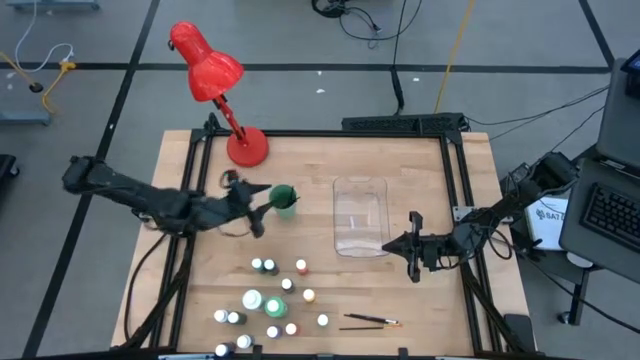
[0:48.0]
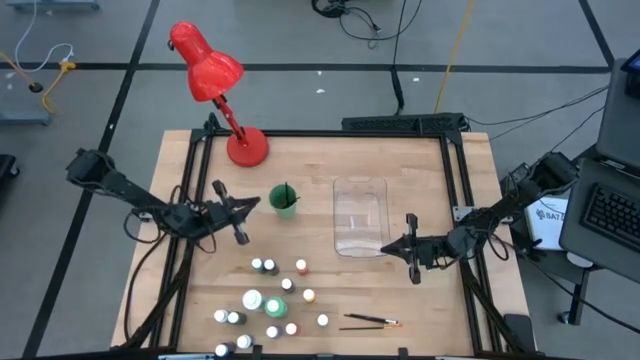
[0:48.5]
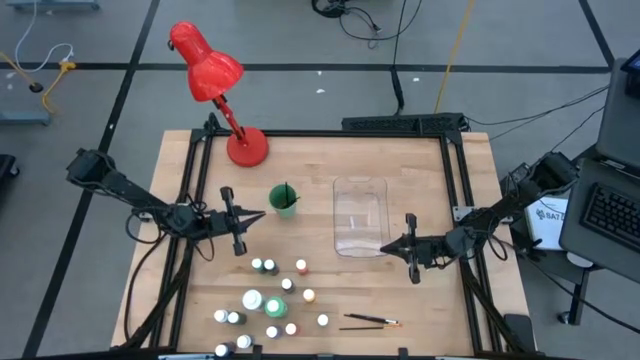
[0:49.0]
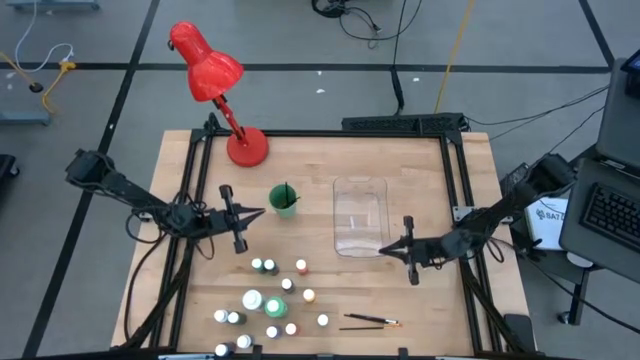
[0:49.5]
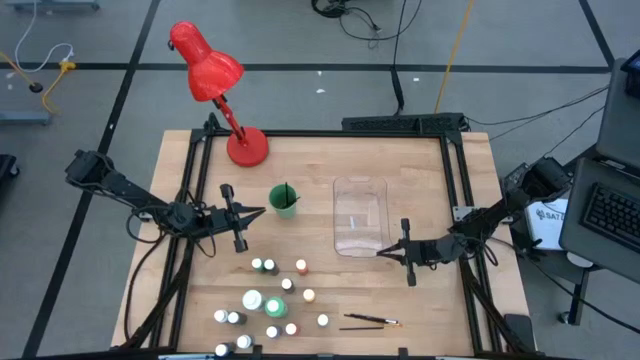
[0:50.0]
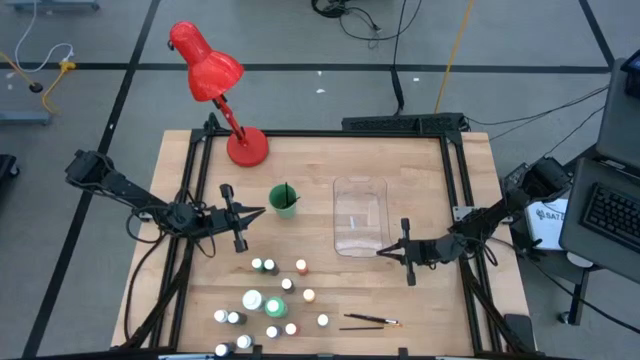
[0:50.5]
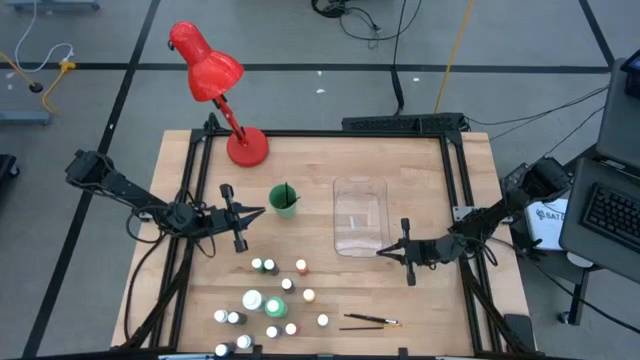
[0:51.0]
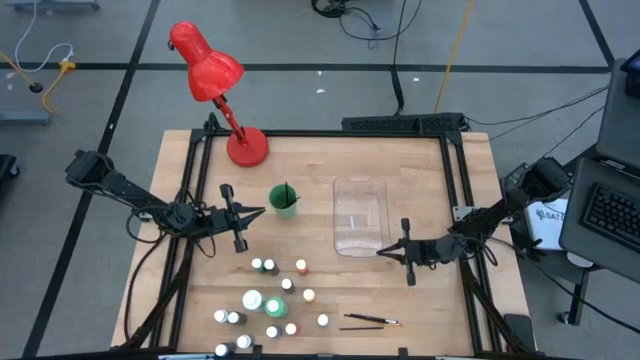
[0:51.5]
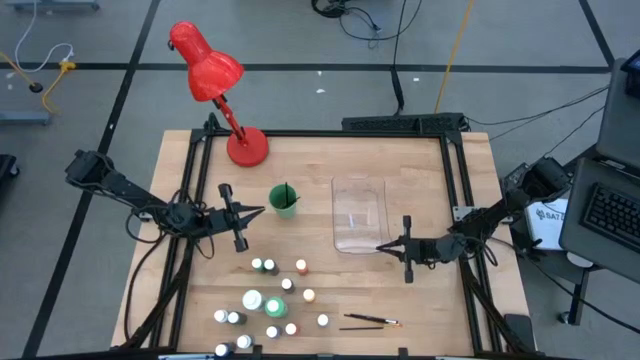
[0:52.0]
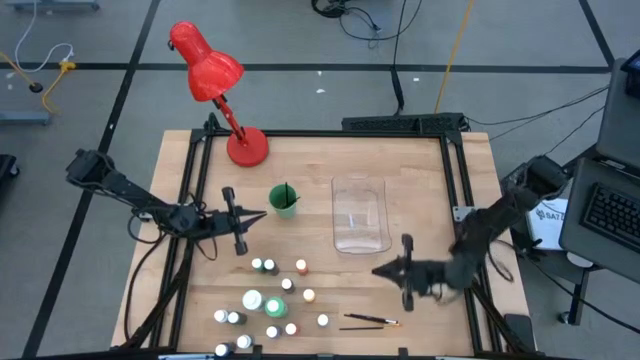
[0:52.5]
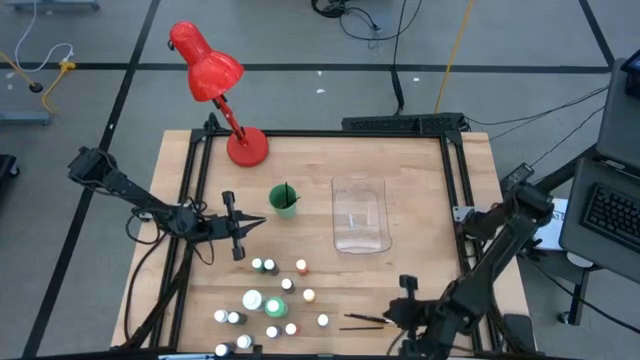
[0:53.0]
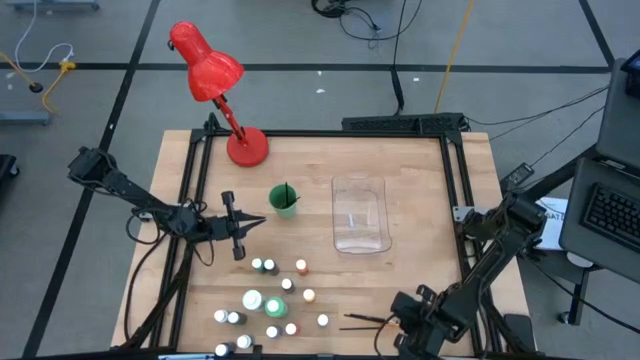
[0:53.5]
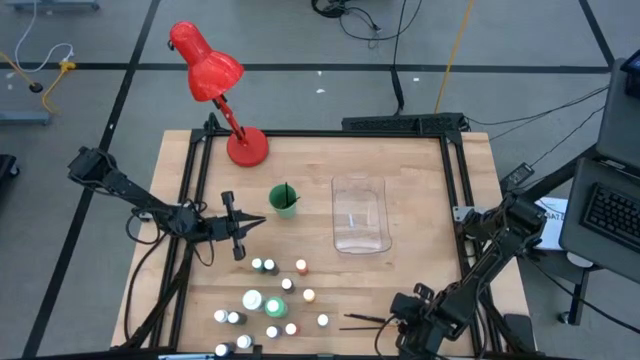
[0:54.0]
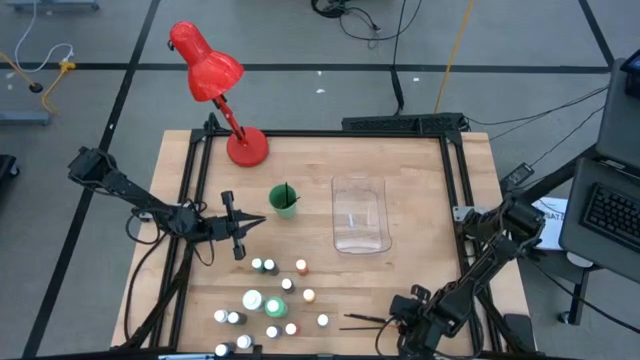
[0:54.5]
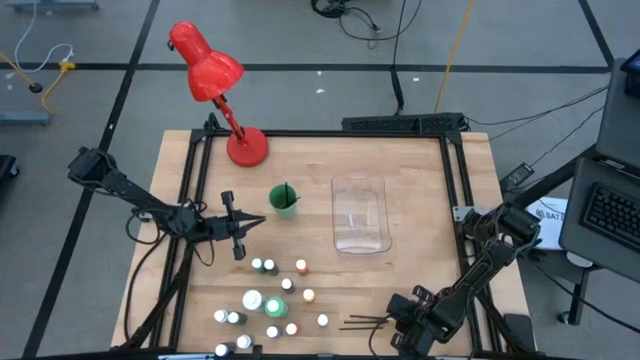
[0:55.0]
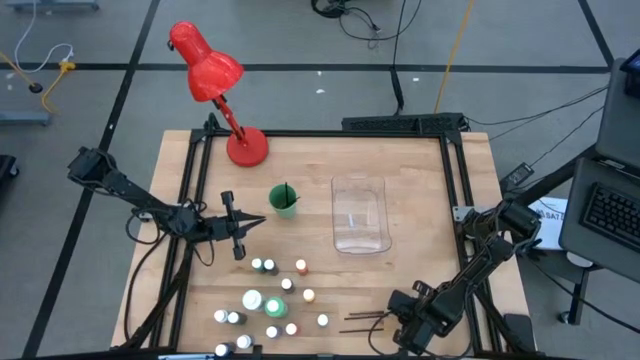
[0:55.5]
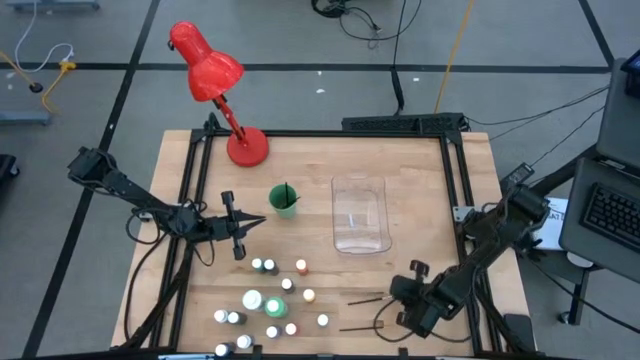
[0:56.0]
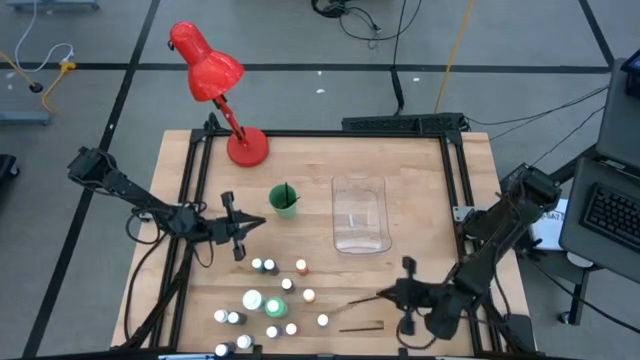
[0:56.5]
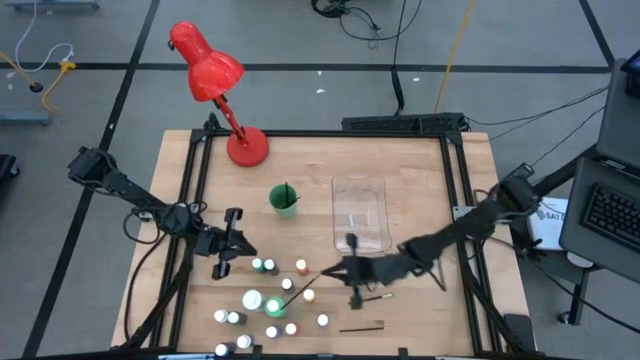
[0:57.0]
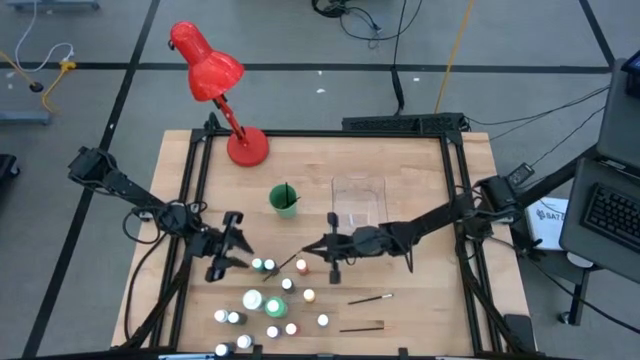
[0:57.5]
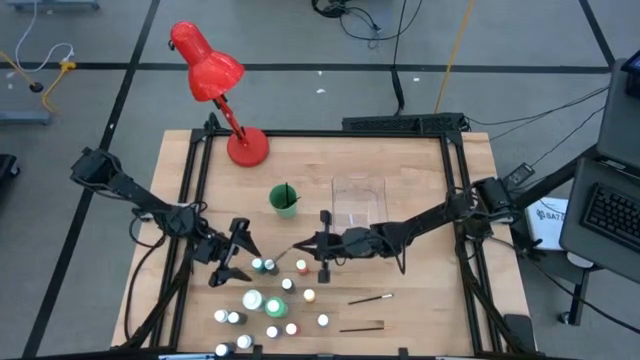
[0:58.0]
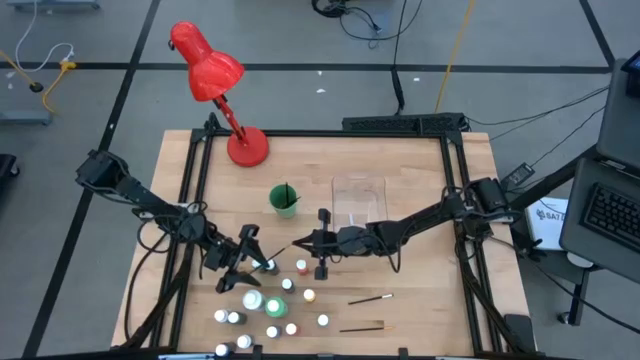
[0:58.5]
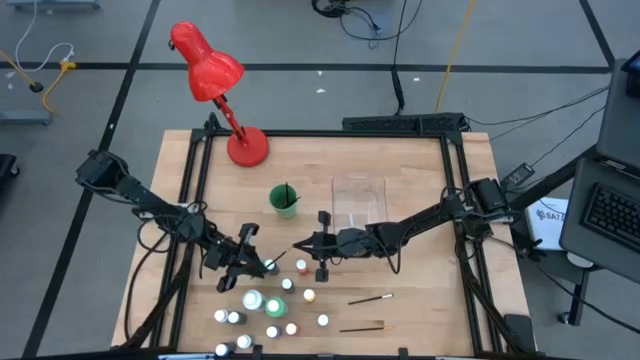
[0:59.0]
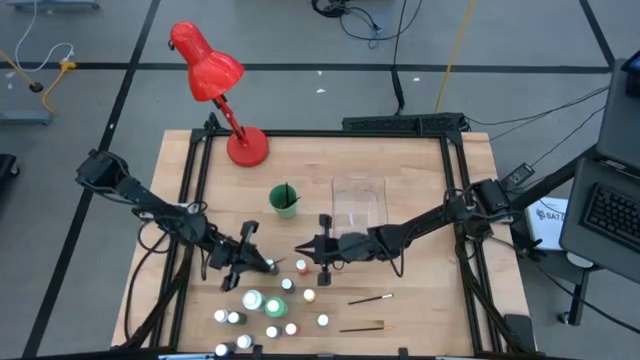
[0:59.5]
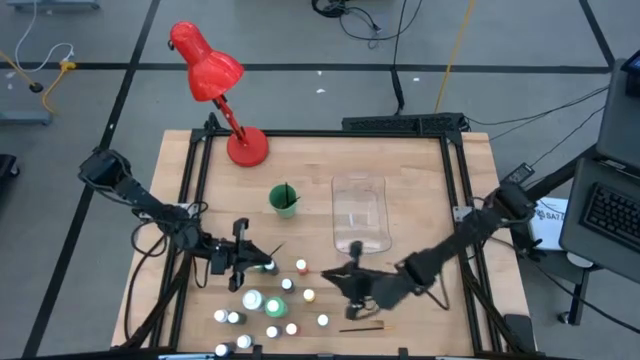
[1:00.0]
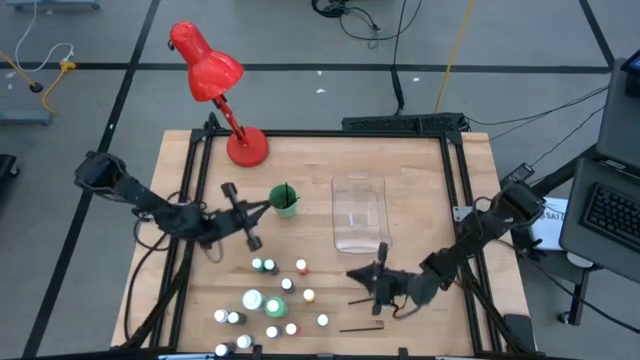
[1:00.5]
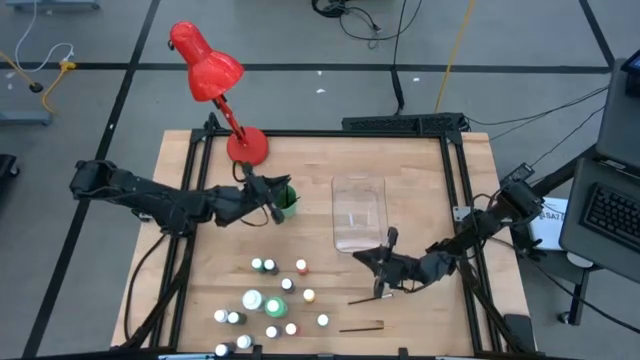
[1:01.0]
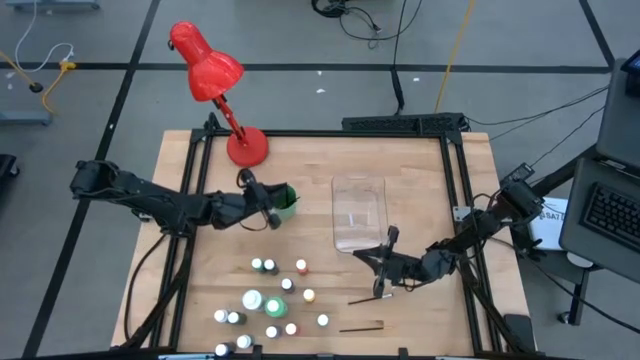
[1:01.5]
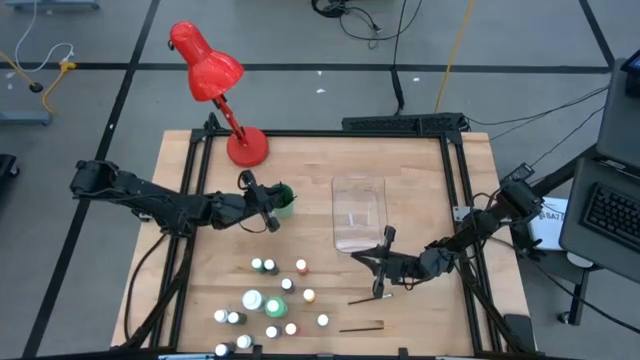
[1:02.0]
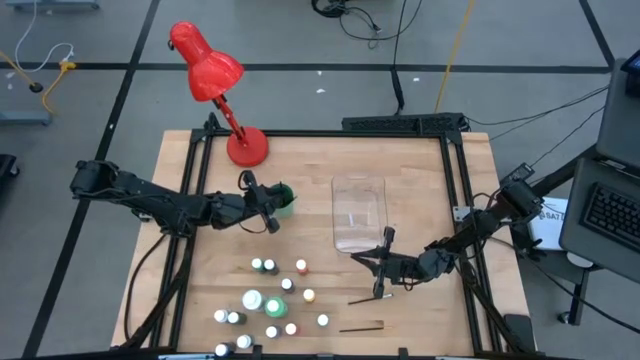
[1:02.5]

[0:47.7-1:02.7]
Task: Pick & Place Paint Supplies
Put the gold paintbrush into the green cup

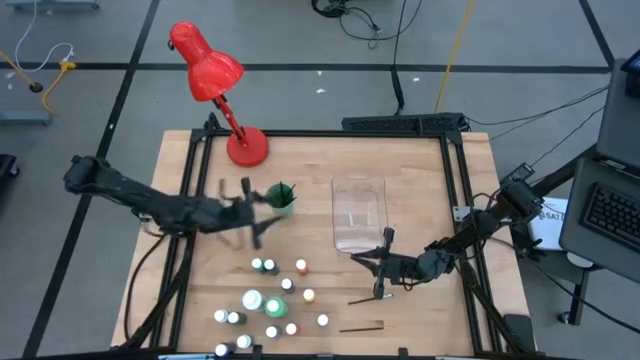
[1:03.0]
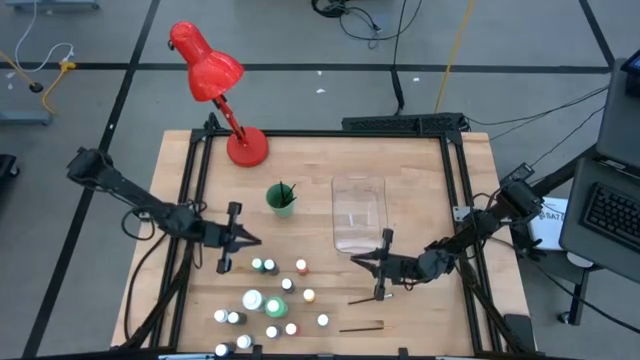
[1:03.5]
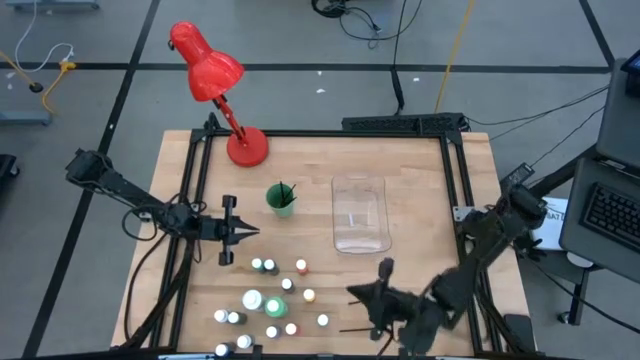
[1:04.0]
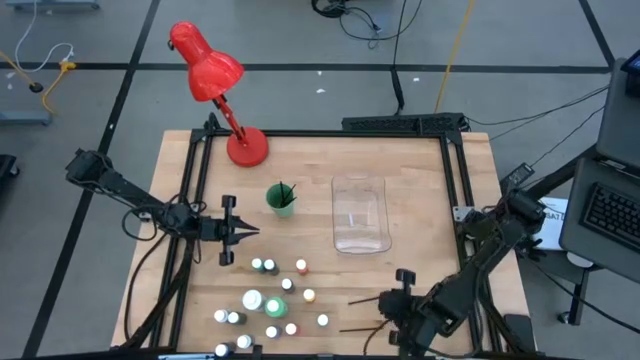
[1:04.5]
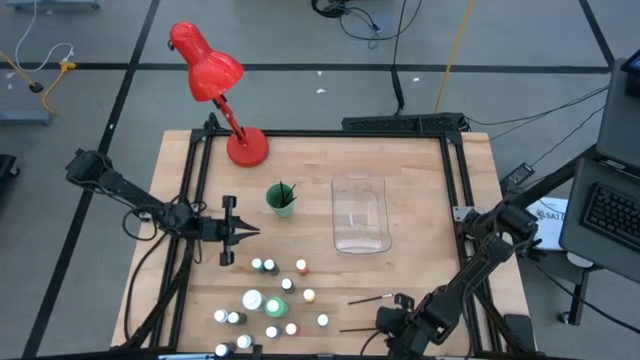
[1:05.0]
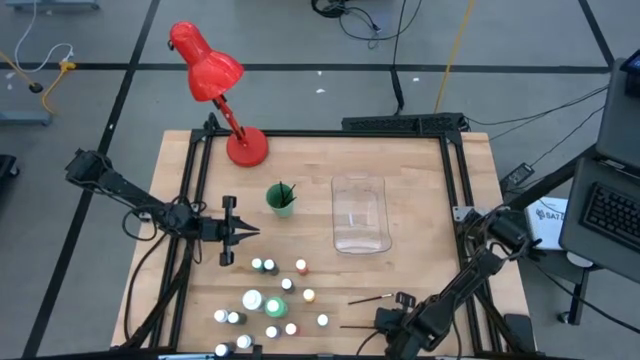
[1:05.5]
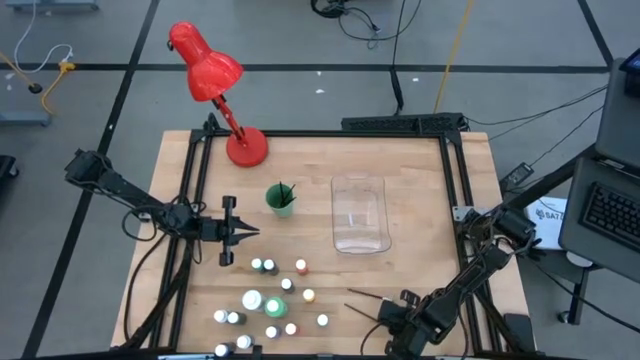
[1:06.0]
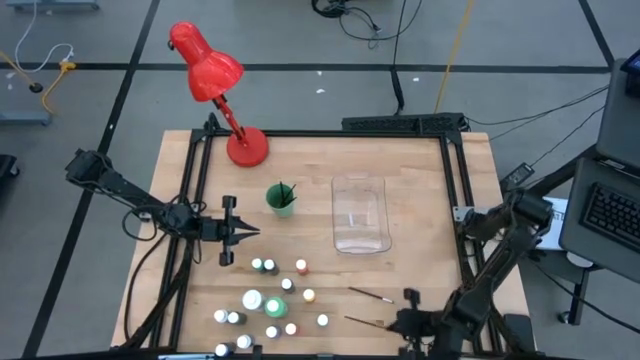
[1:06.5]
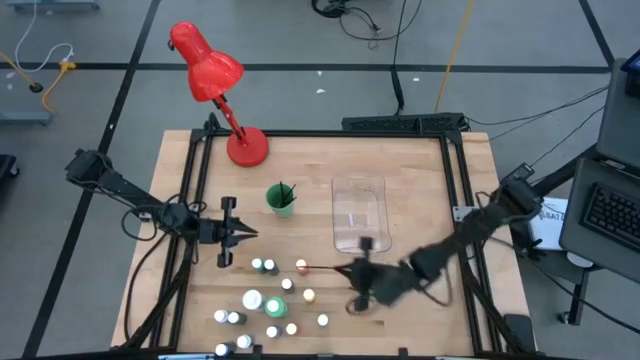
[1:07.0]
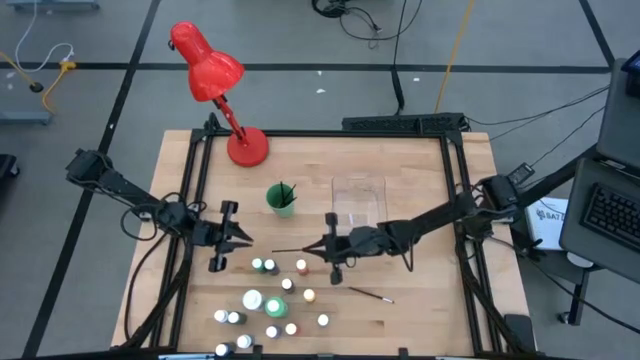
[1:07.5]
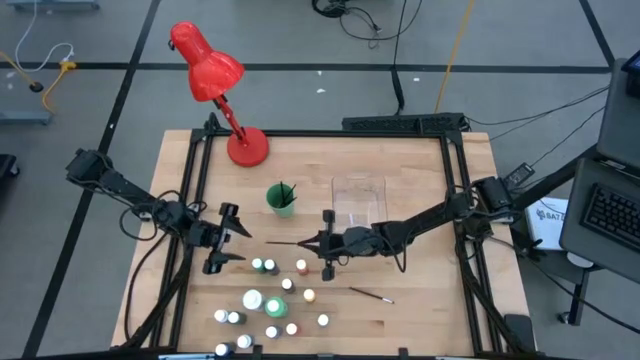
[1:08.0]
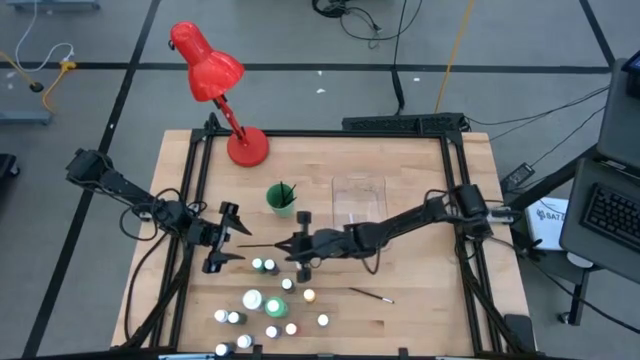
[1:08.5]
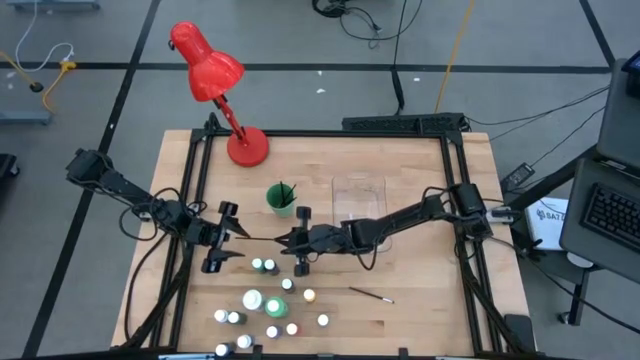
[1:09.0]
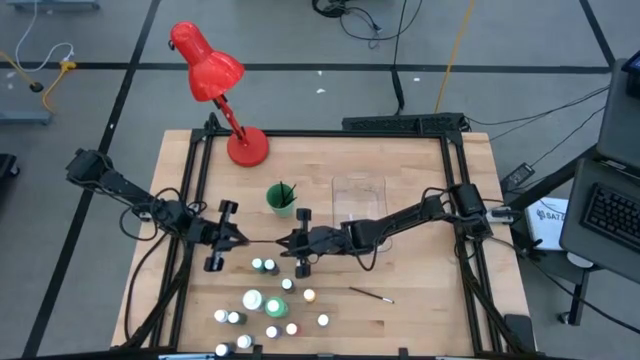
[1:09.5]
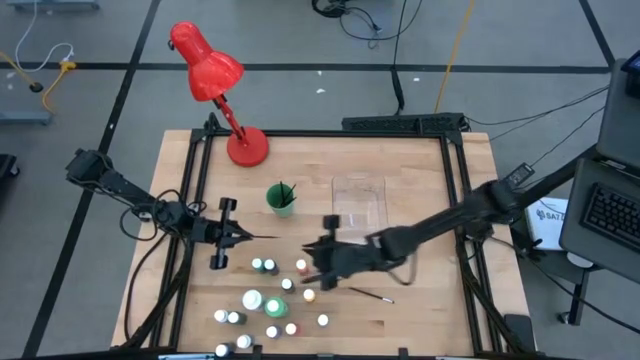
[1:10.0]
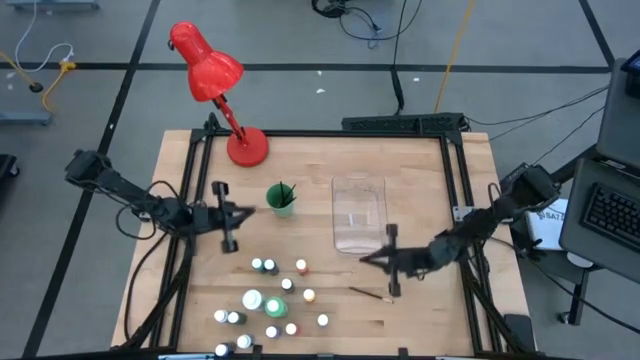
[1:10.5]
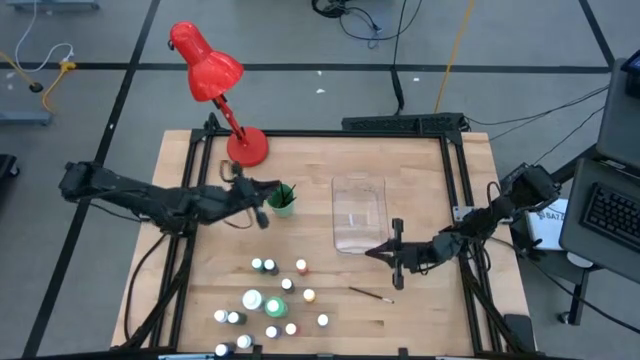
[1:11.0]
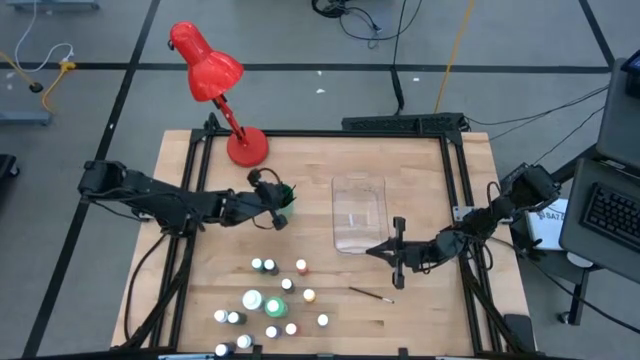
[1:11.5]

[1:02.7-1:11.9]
Put the gold paintbrush into the green cup
